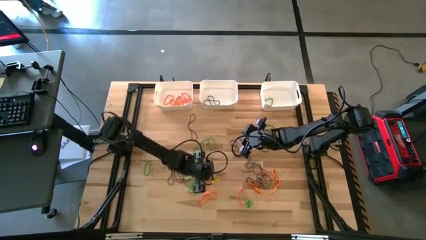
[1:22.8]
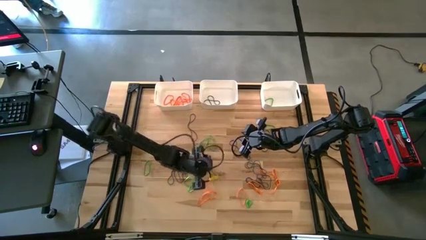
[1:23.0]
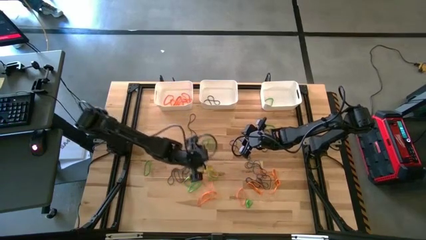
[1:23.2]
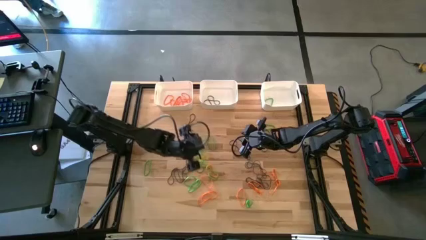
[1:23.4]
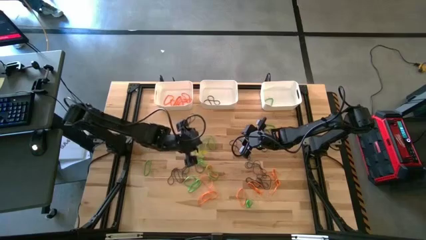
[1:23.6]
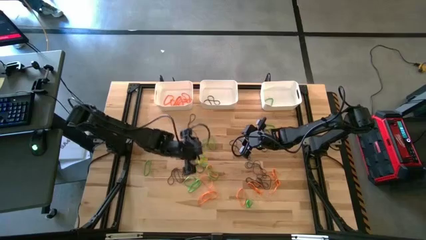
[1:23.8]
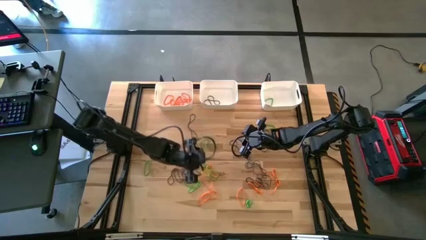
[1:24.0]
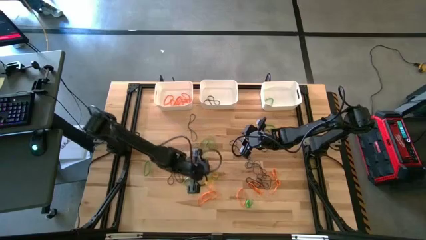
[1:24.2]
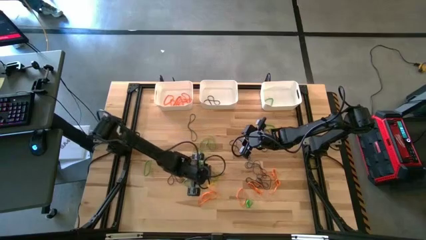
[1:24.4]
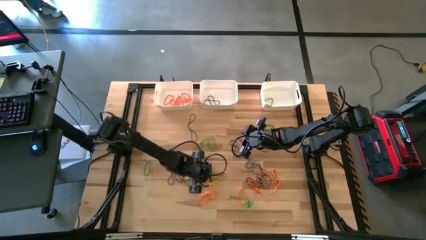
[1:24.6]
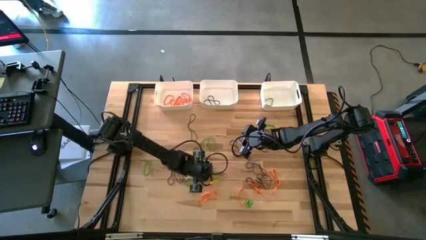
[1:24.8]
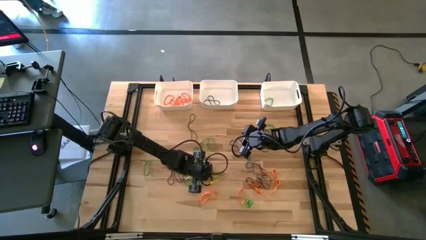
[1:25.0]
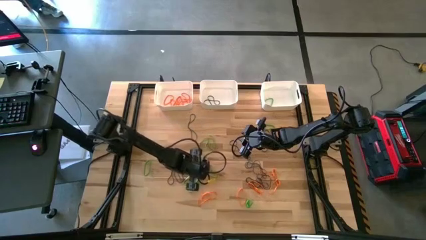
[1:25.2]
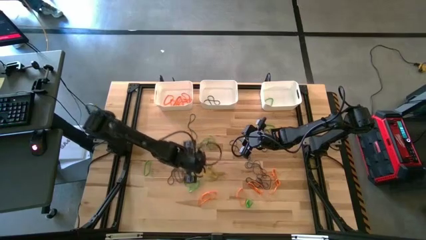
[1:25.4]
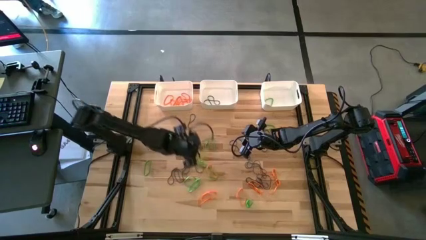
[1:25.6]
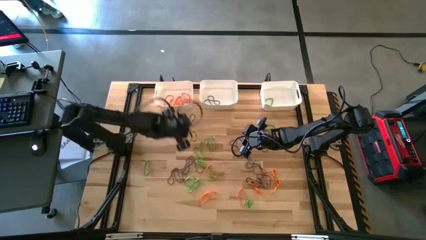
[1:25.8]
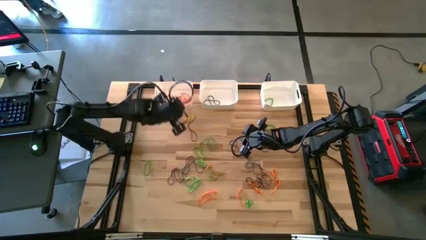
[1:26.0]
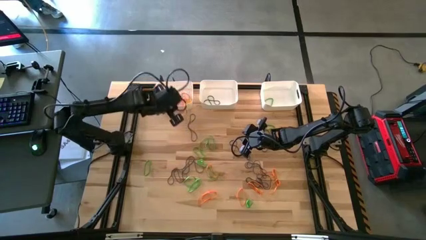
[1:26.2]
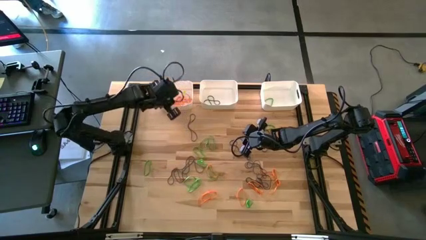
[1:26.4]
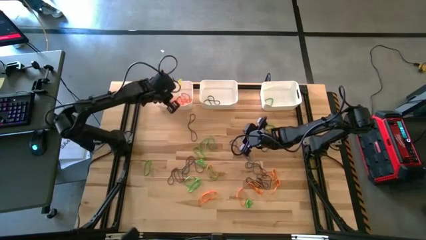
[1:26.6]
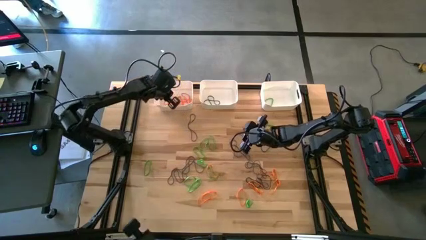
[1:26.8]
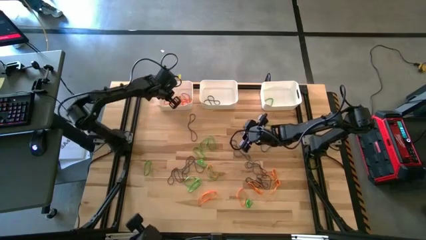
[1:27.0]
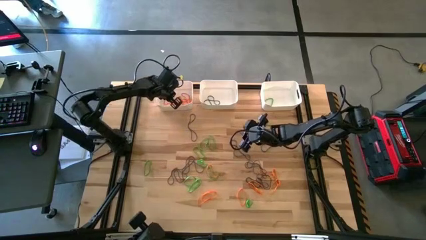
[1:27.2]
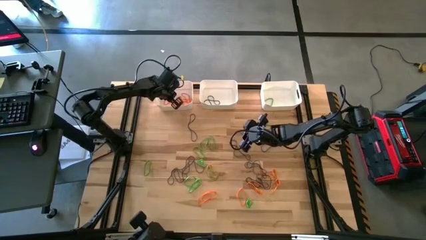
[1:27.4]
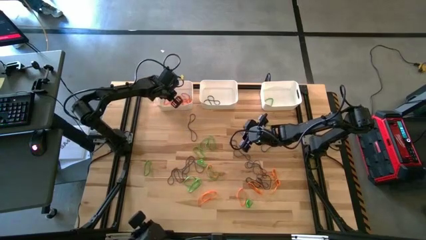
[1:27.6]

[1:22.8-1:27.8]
Task: Sort rubber bands into baskets
Put the orange rubber band into the left white bin

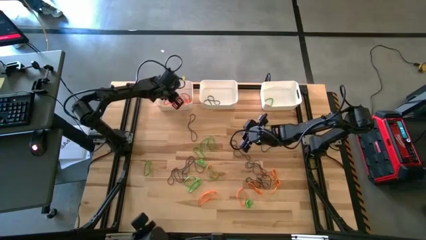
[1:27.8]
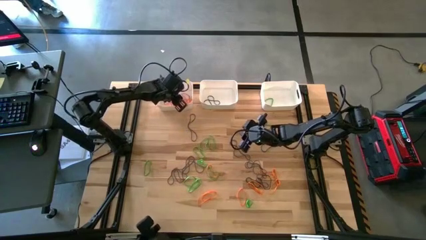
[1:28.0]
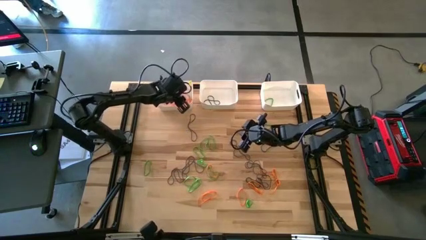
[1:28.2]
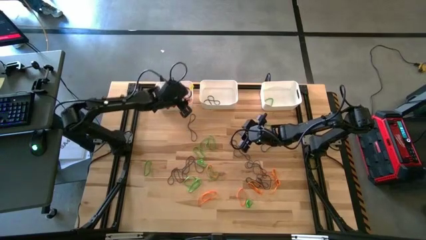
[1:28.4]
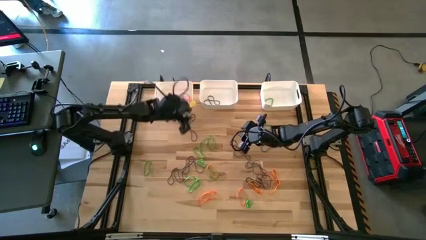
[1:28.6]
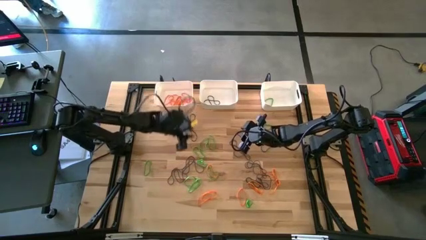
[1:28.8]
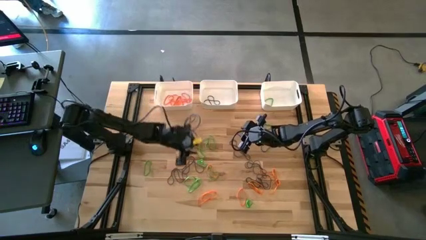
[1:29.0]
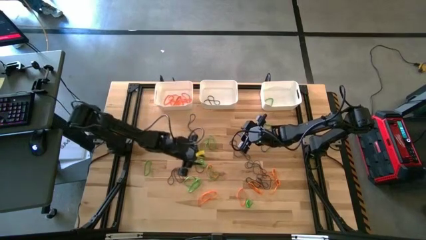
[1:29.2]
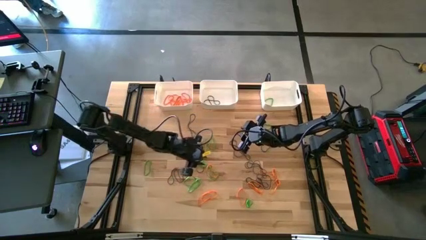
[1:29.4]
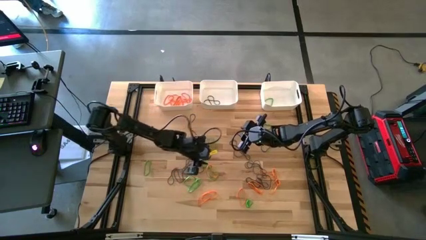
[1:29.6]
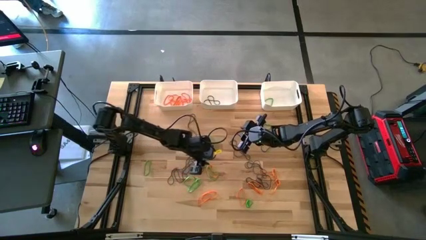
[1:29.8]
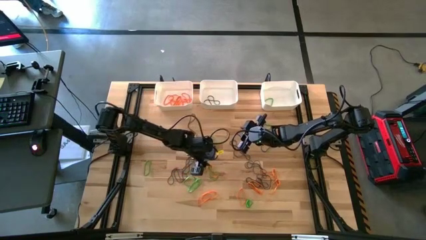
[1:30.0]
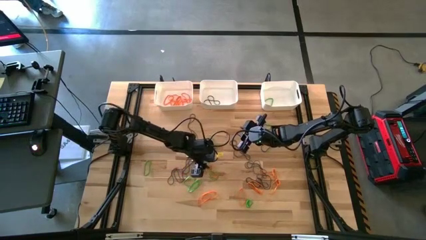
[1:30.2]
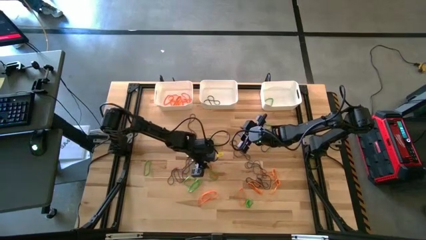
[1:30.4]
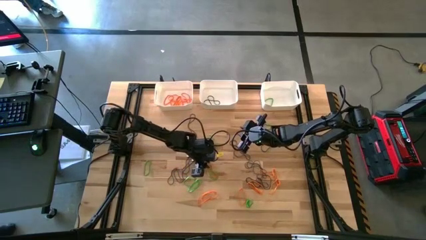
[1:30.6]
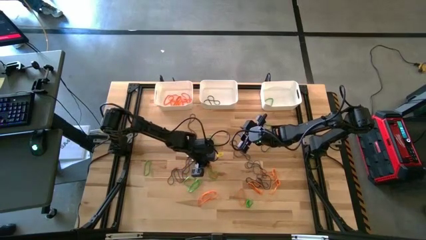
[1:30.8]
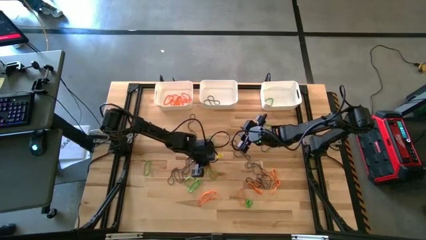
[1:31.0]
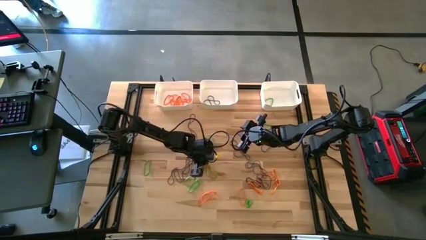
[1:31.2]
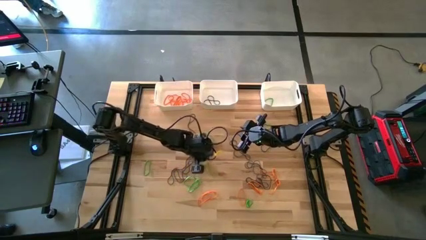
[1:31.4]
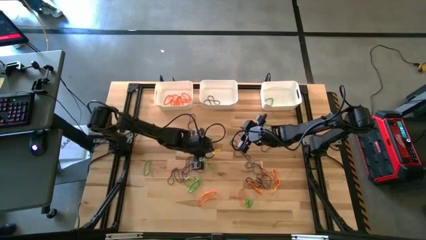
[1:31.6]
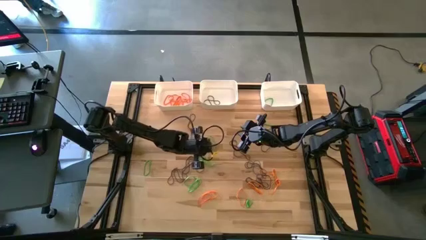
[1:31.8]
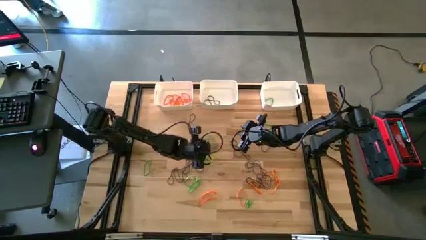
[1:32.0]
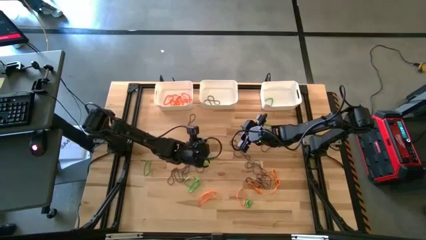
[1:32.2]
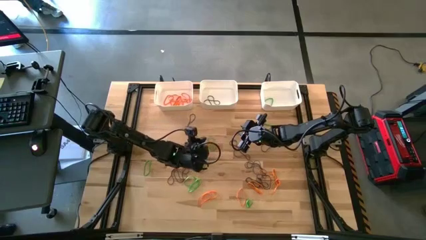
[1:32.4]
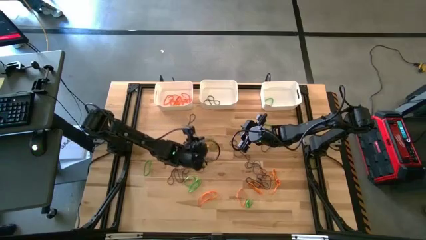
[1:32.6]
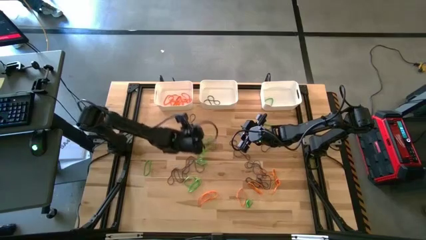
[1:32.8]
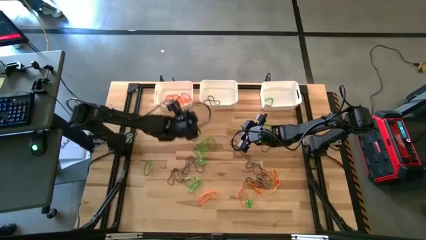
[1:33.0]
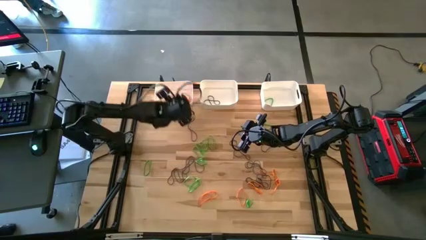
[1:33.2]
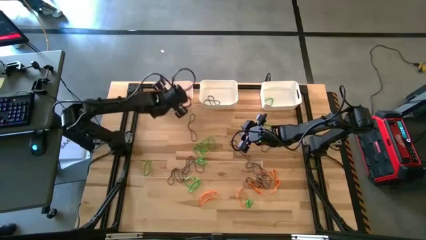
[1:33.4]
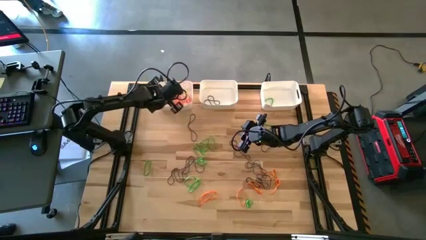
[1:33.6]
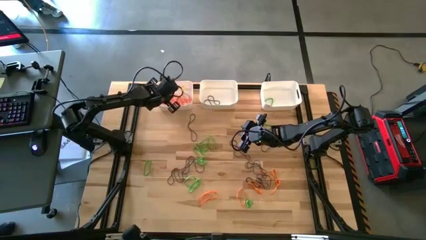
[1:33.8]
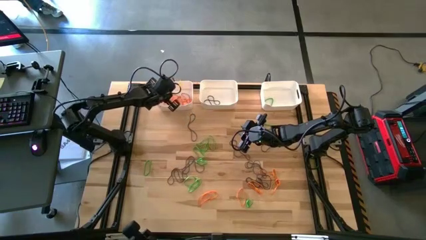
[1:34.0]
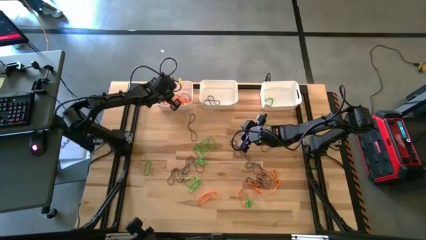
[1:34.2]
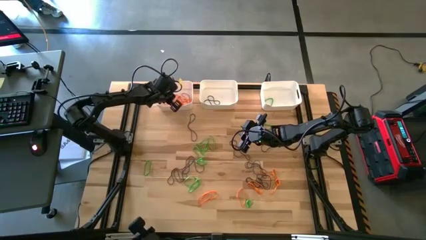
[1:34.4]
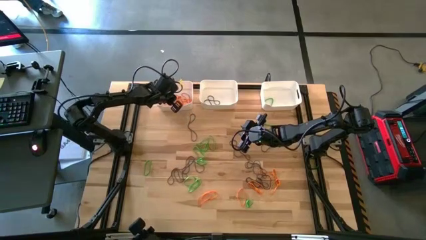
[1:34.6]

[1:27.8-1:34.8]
Put the orange rubber band into the left white bin

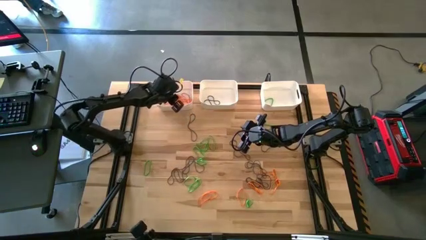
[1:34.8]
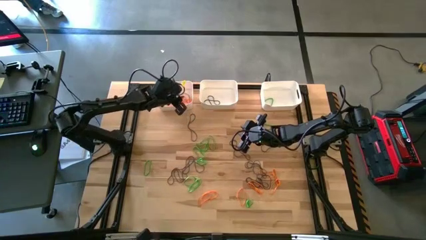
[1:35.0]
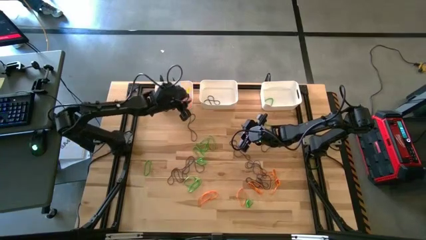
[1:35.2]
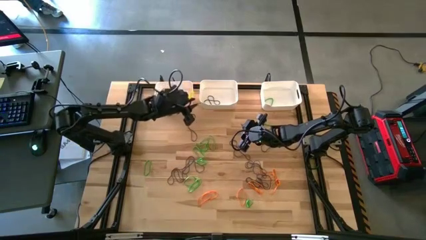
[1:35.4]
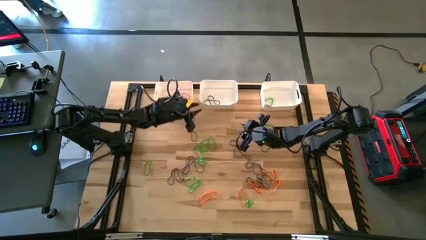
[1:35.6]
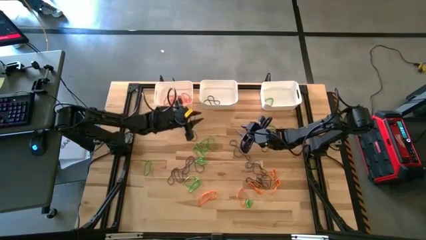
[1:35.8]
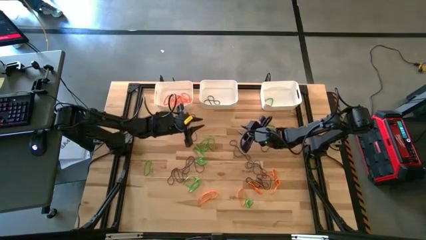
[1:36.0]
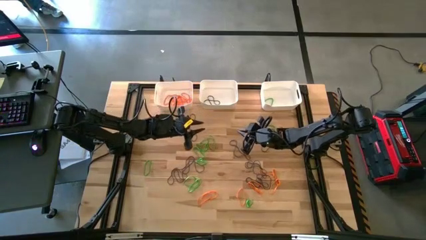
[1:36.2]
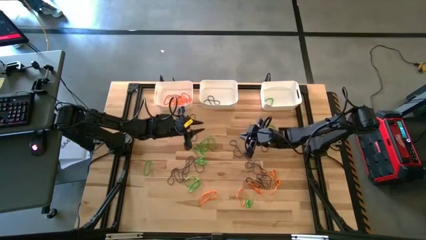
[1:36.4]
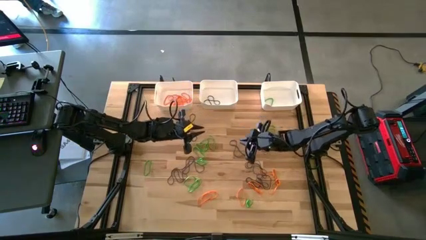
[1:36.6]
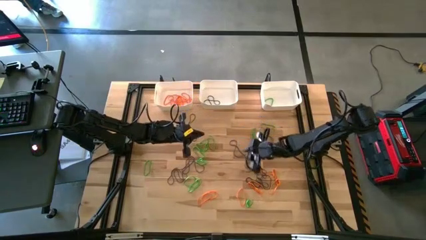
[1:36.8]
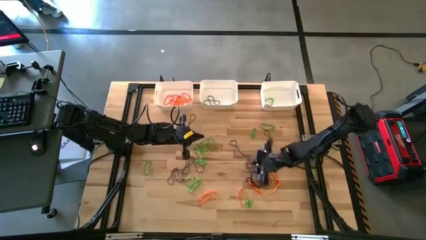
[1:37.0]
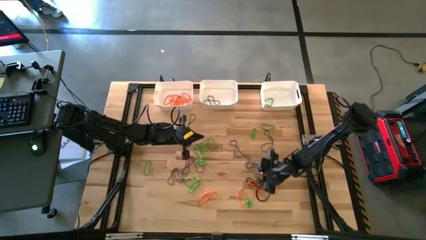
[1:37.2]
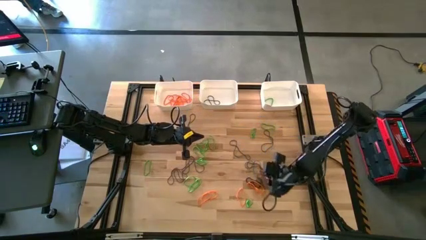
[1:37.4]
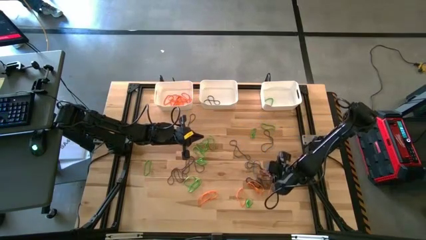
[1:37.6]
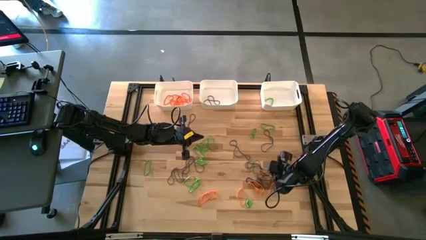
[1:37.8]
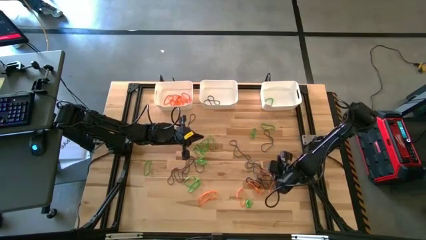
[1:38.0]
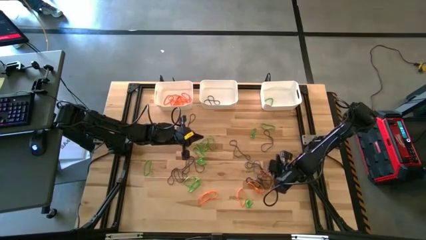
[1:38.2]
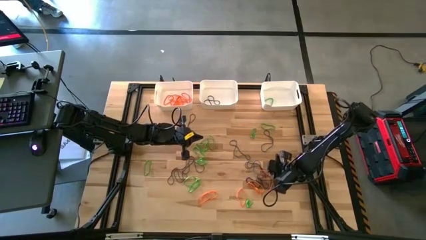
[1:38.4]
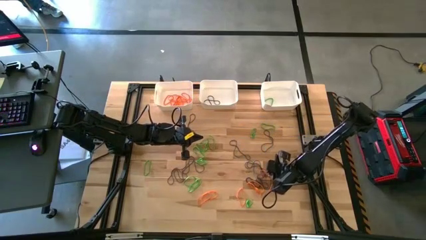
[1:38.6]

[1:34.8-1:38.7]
Put the orange rubber band into the left white bin

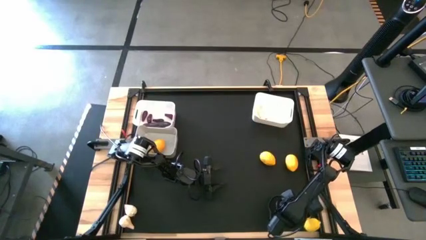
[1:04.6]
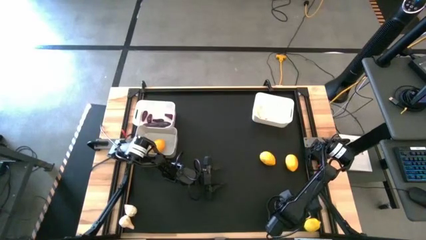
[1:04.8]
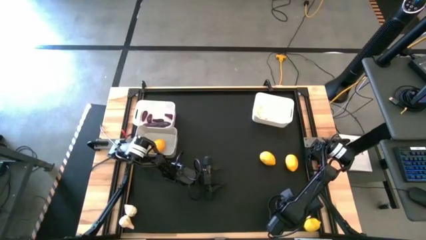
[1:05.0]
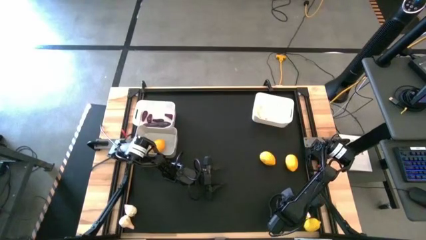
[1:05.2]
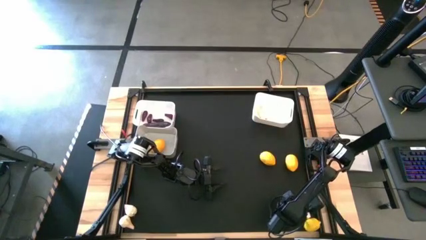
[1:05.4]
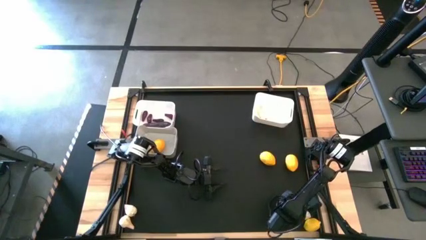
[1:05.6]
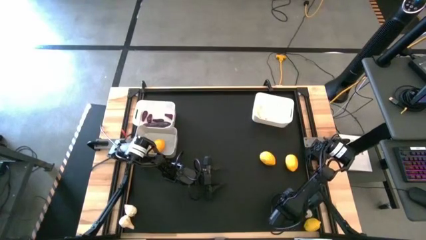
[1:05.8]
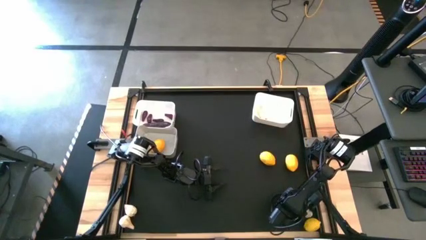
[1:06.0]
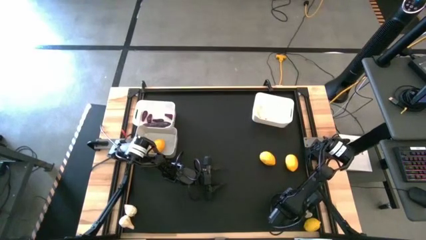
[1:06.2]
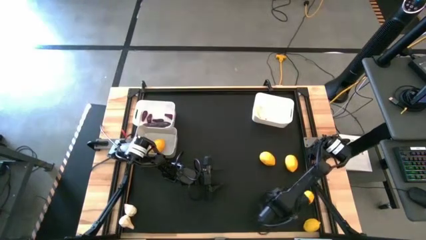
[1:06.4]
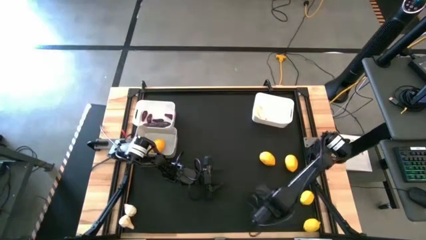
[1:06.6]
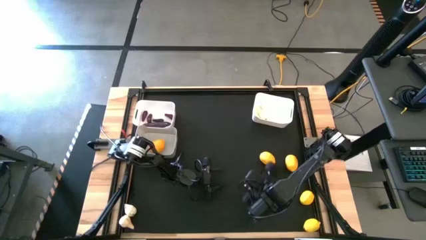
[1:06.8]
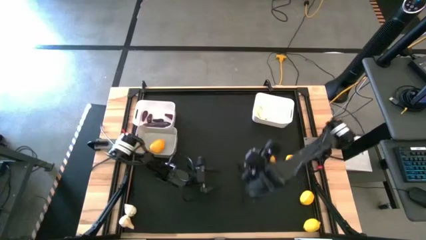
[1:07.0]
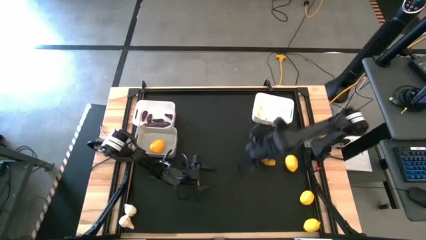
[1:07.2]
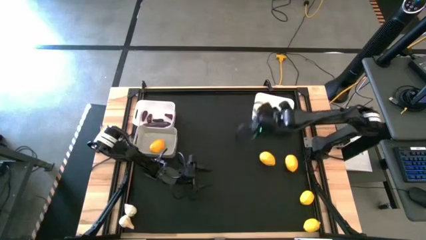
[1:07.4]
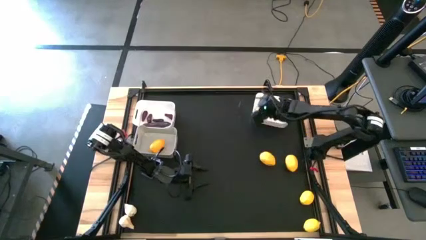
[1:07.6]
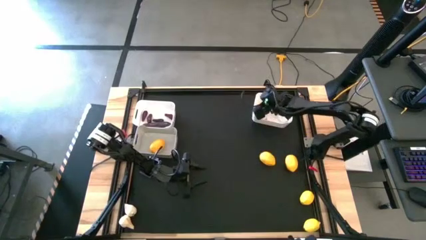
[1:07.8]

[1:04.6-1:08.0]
Task: Sort produce into baskets
Put the garlic into the right white bin
